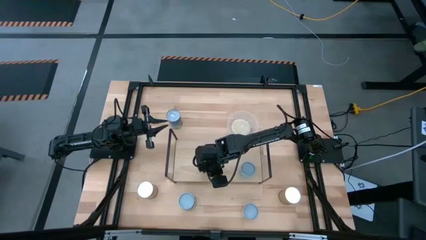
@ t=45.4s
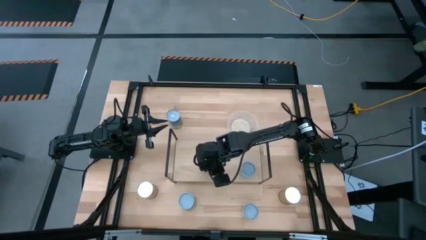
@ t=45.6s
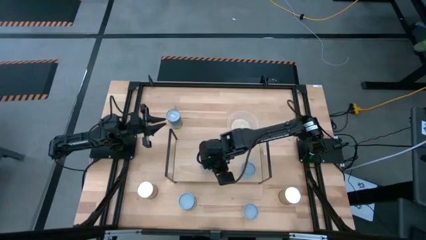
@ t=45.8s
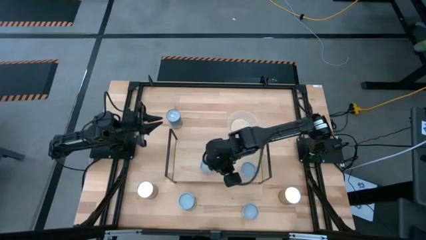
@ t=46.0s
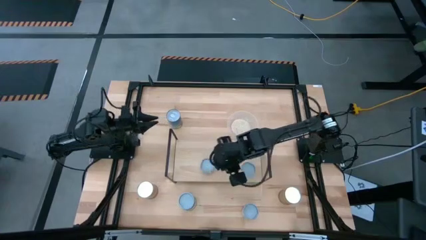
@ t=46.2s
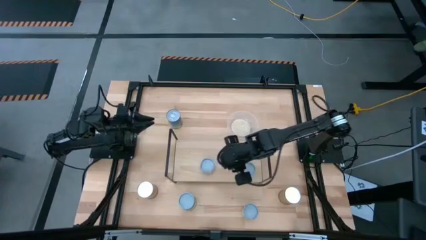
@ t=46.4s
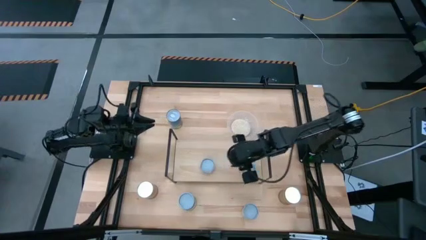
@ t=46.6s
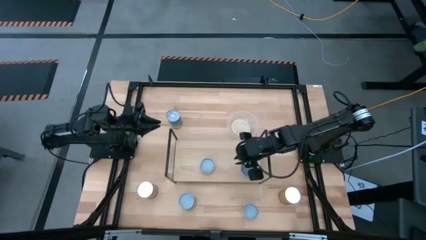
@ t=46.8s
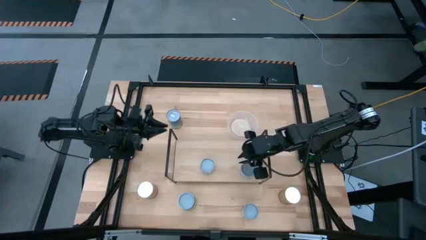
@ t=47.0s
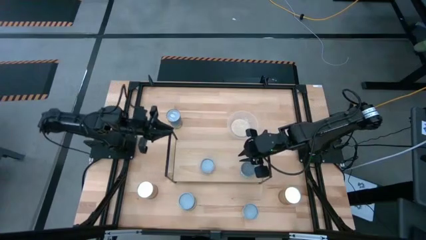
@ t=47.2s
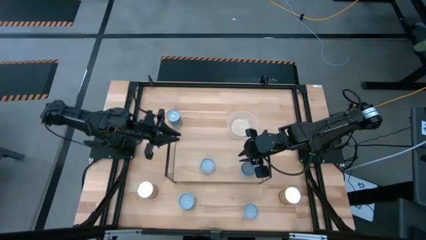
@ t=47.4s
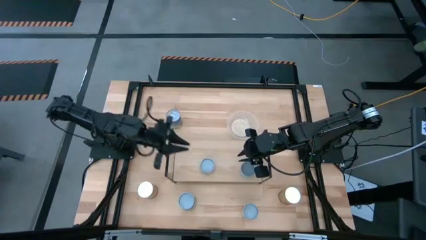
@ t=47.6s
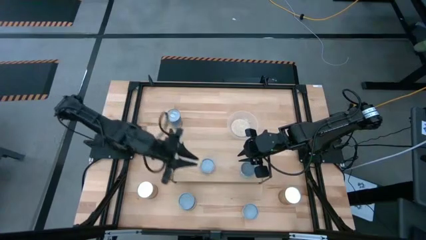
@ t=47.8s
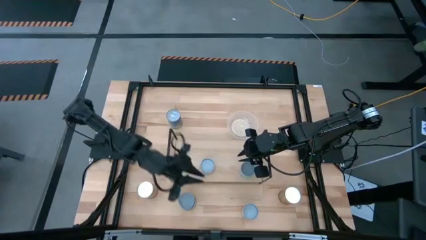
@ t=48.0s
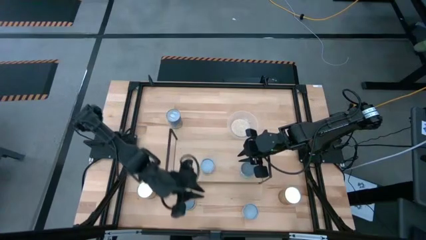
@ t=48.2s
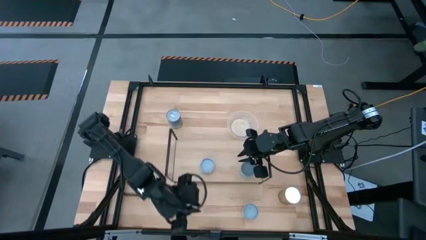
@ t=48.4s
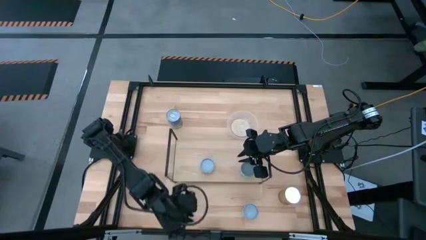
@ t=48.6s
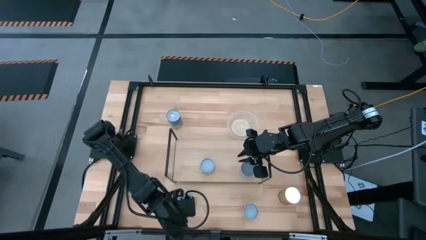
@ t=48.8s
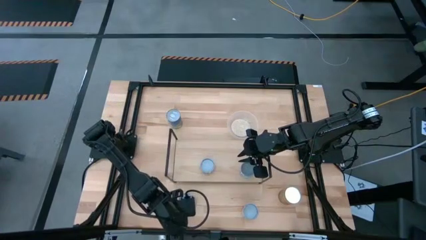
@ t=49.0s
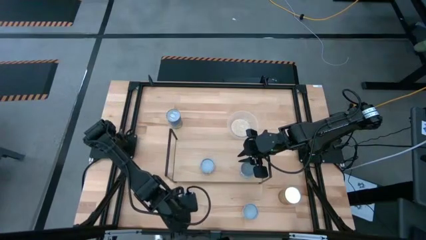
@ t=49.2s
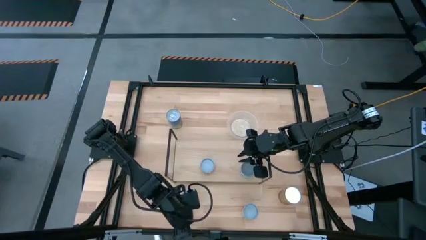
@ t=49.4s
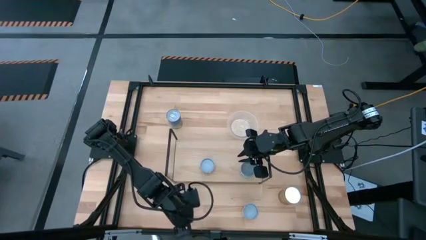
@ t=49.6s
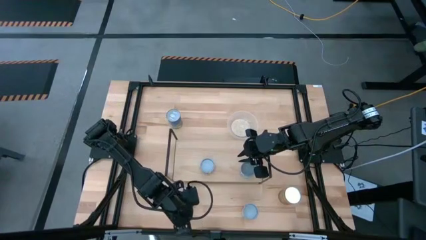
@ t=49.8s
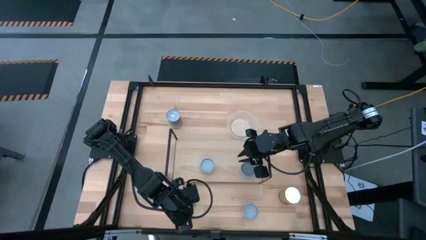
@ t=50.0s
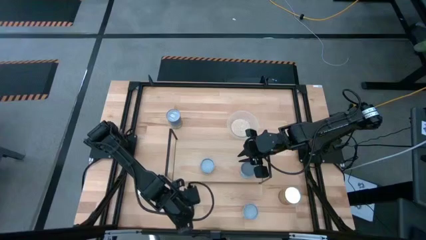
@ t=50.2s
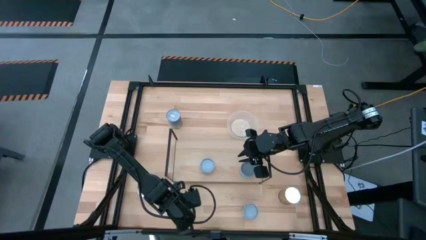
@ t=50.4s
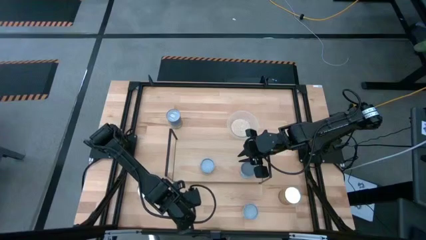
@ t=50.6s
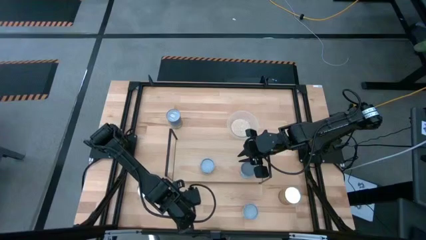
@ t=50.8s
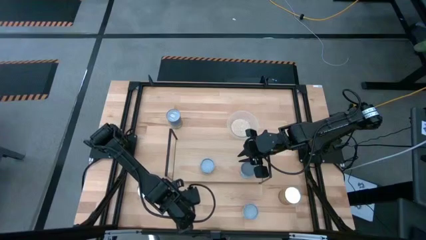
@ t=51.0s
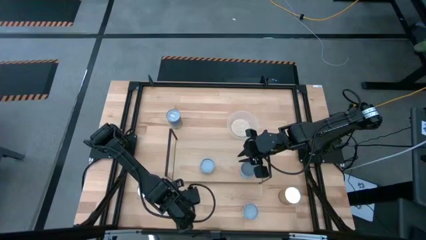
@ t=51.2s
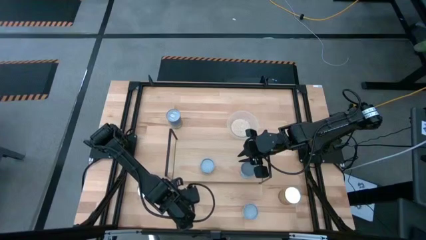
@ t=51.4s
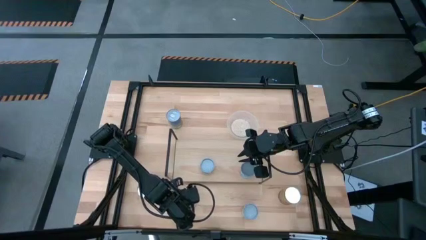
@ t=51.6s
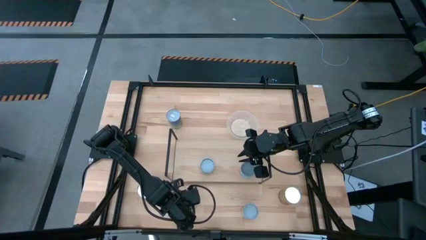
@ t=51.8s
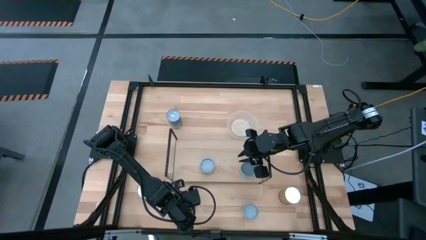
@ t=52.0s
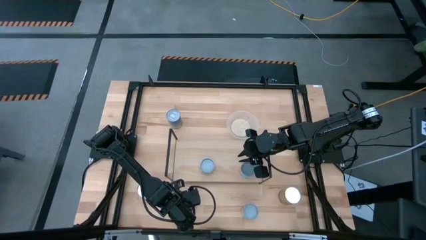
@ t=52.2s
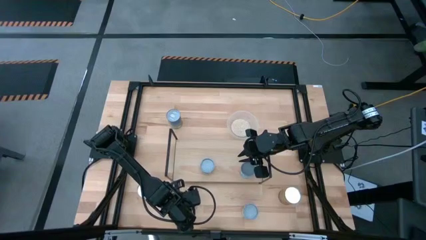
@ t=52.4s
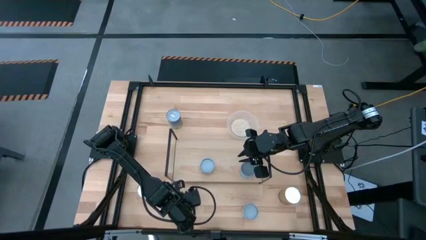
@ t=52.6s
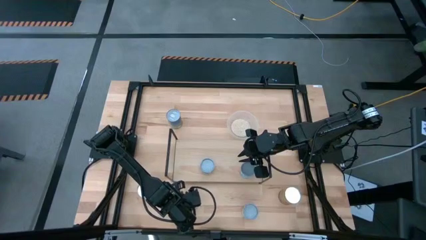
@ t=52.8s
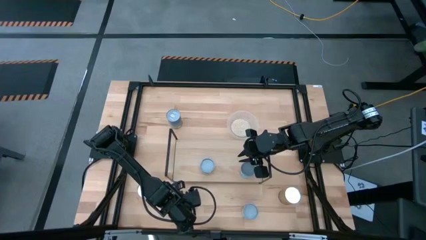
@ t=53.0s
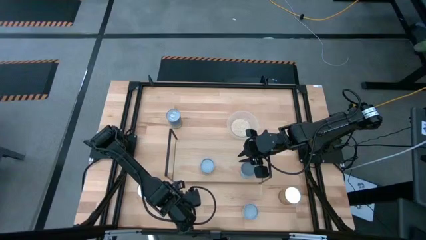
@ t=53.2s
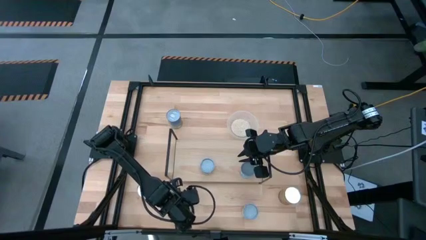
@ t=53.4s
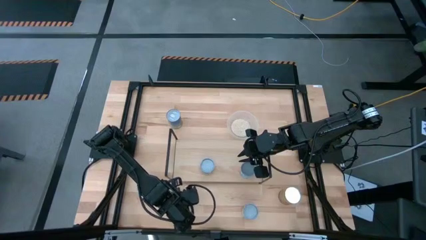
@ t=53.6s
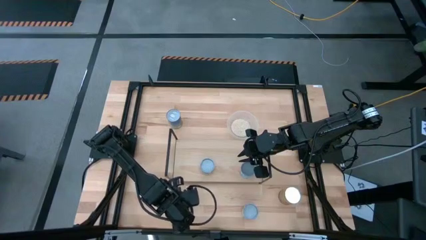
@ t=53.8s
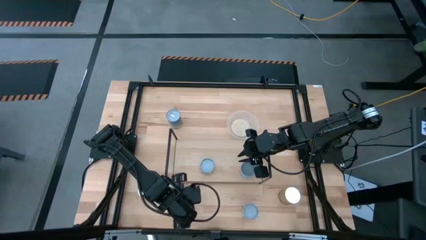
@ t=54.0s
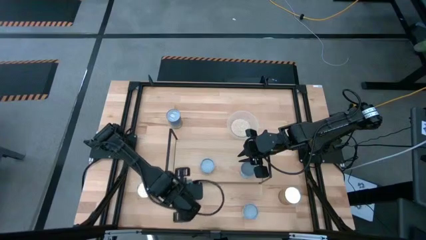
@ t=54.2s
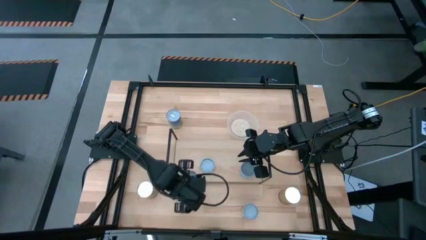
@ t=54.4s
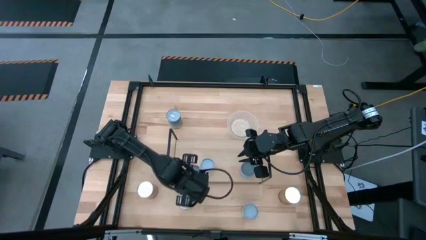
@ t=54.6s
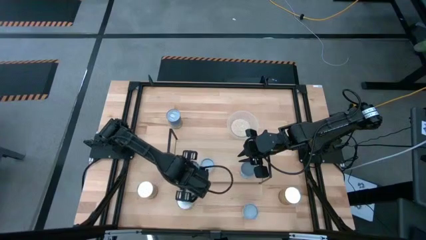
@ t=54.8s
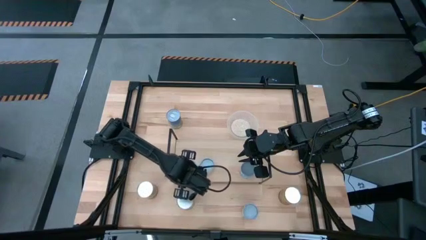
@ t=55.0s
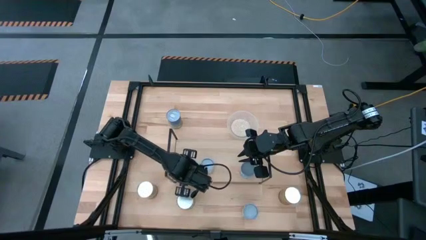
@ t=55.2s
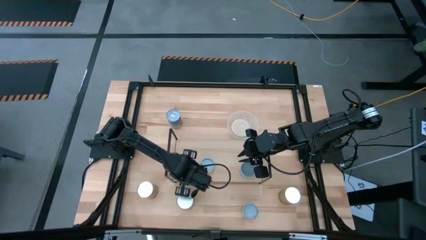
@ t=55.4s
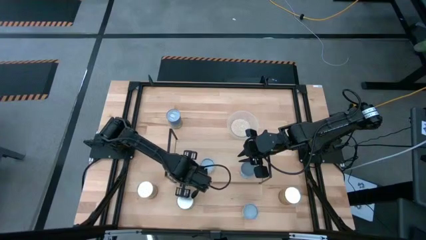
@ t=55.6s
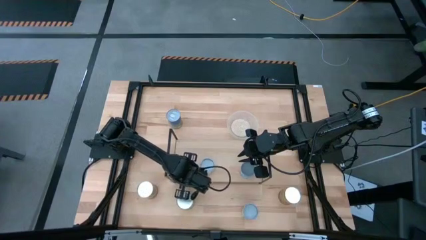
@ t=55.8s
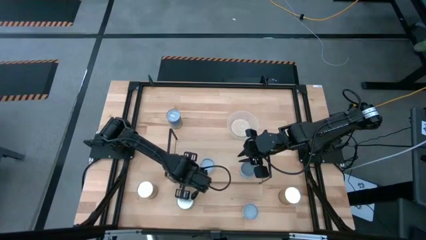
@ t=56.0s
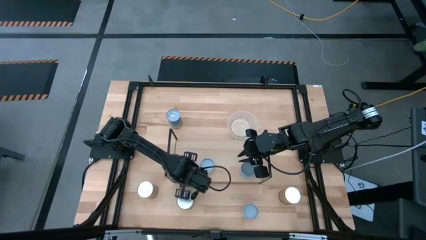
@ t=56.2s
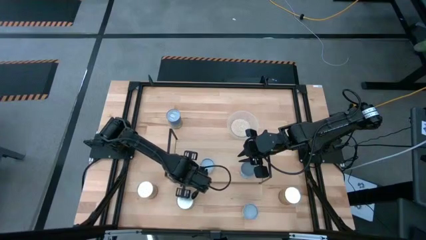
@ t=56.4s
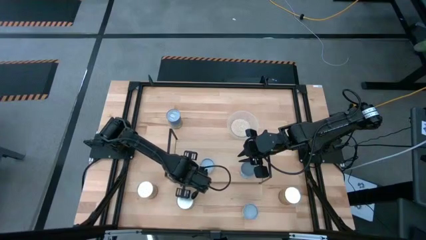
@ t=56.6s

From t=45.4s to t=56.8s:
Task: Pick and place cans onto a shelf
Put the canned mushroom on the shelf
